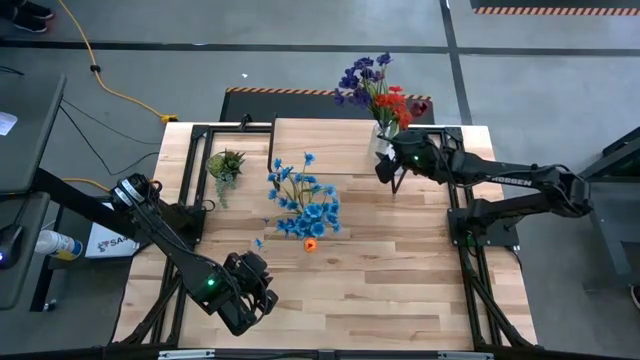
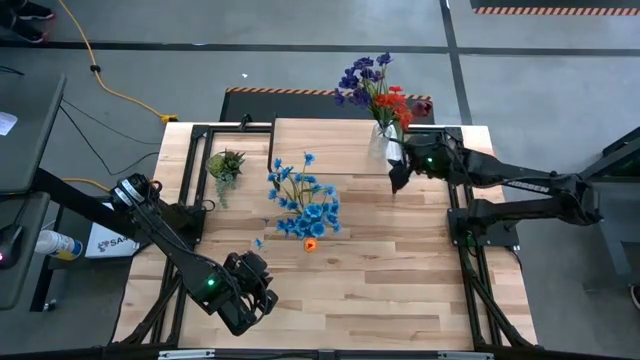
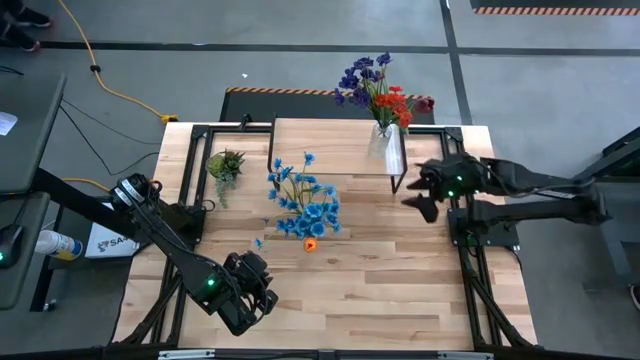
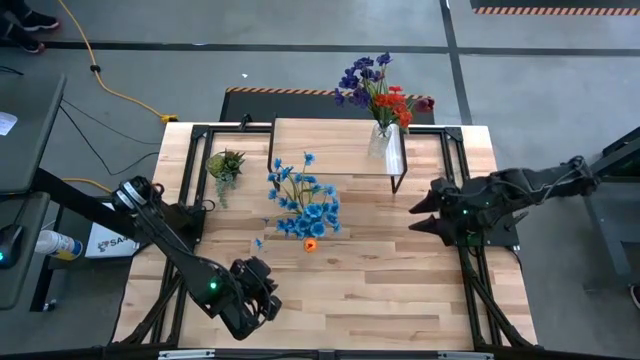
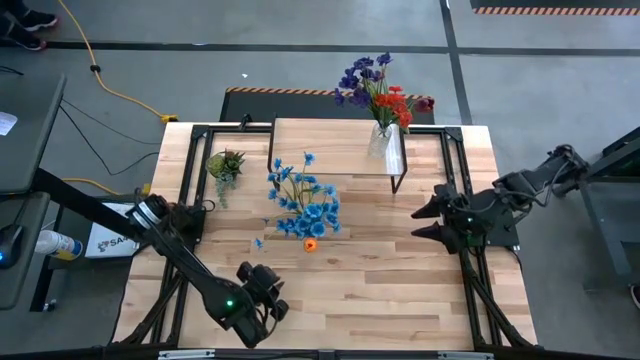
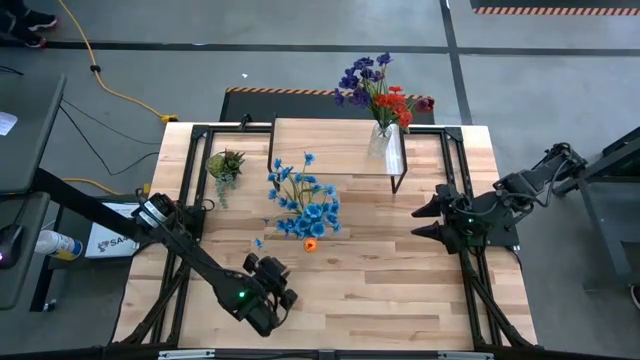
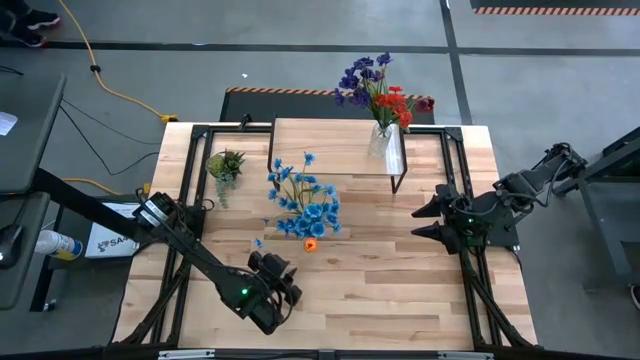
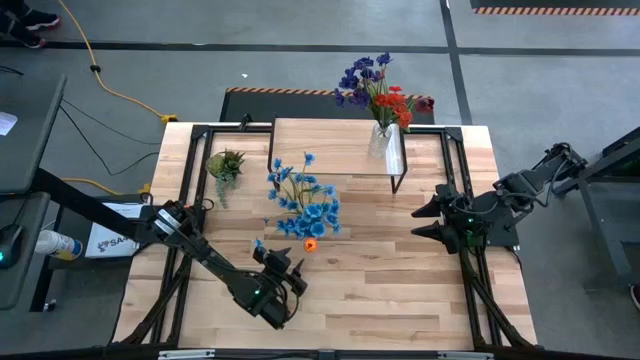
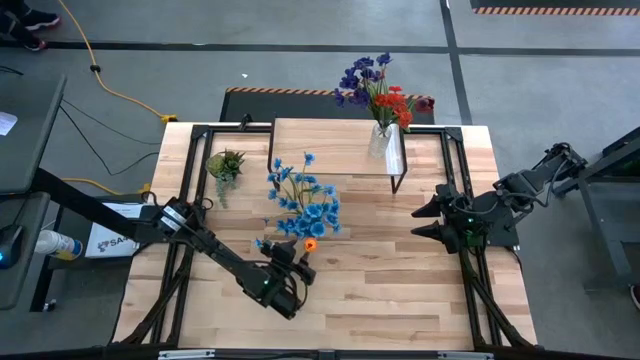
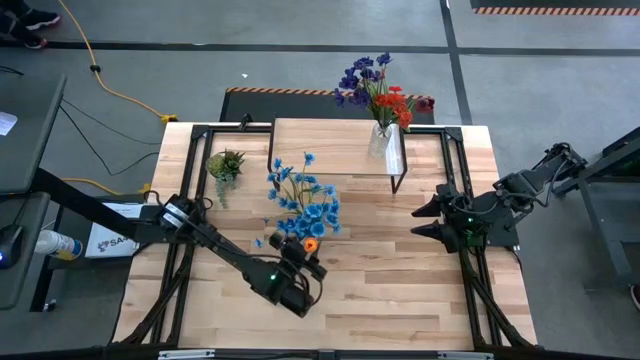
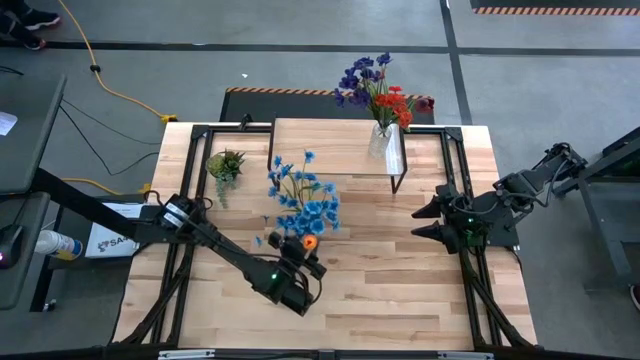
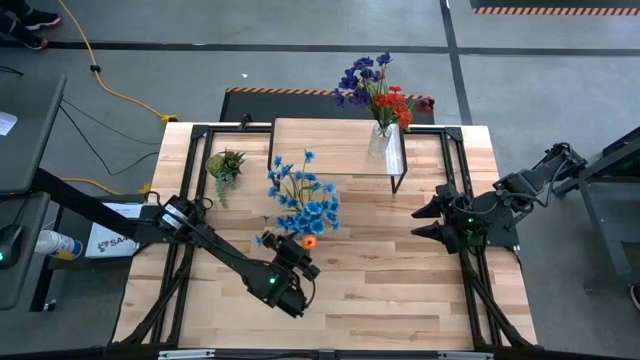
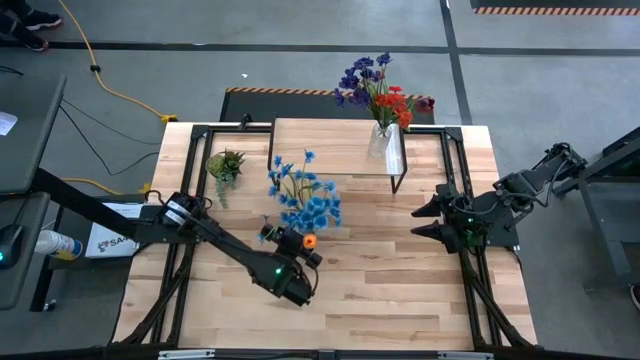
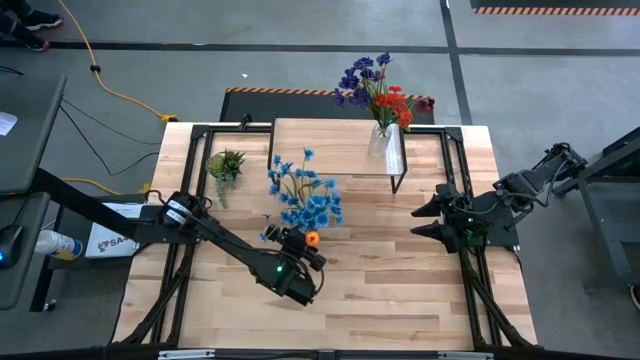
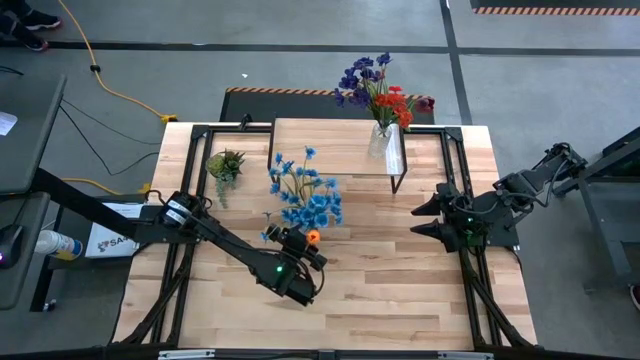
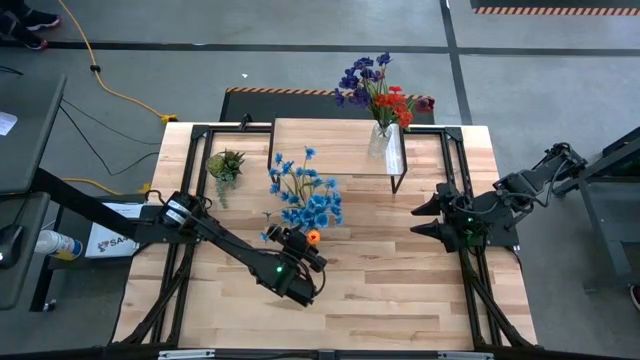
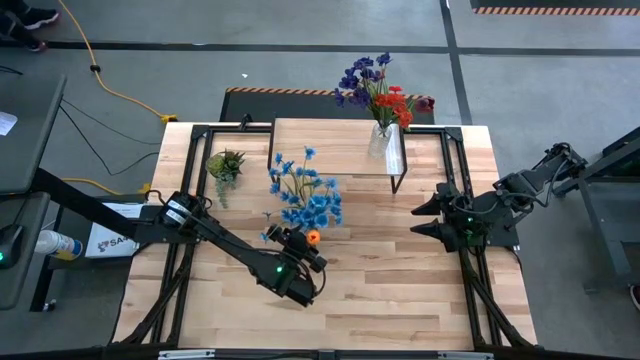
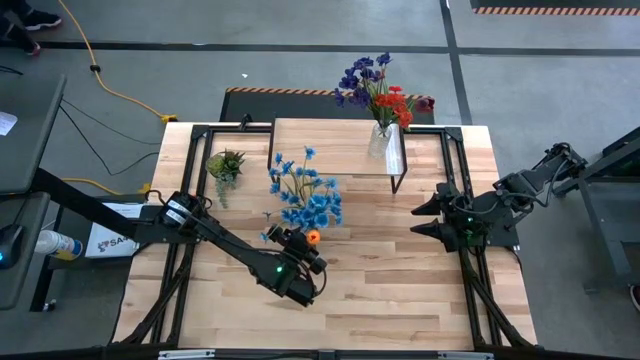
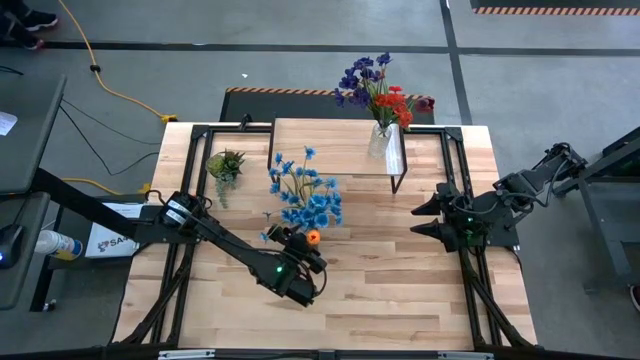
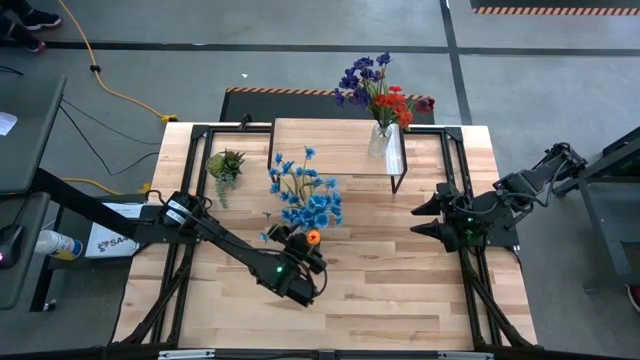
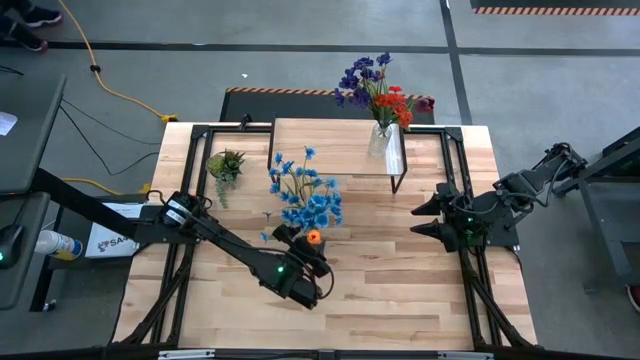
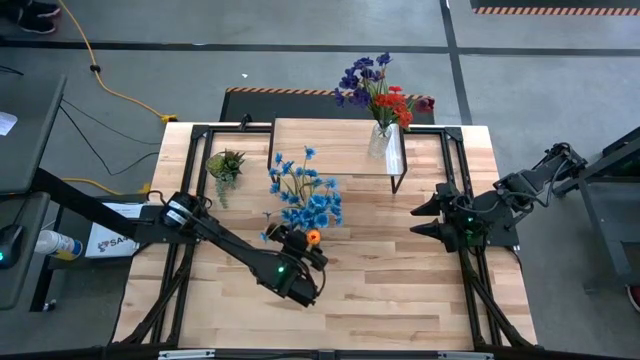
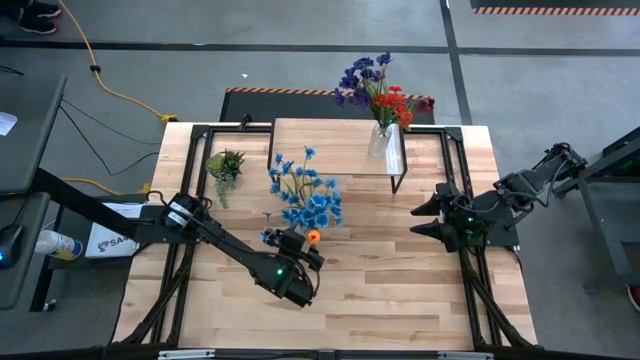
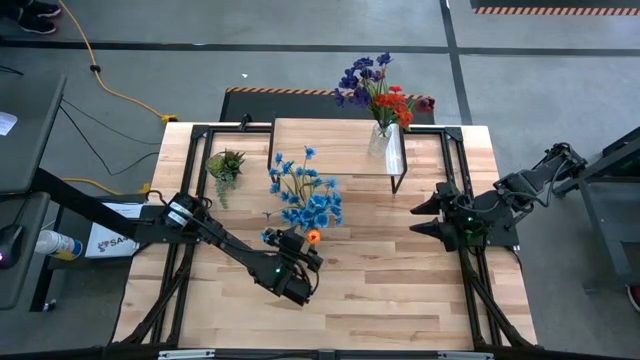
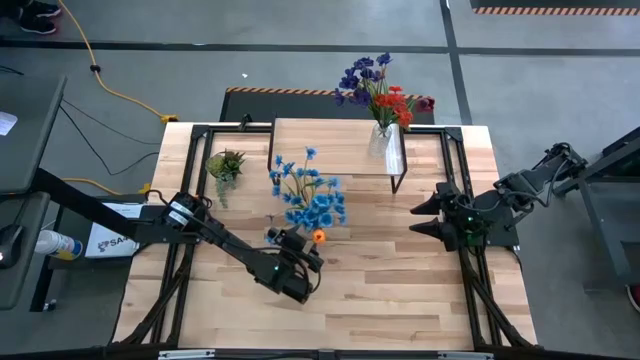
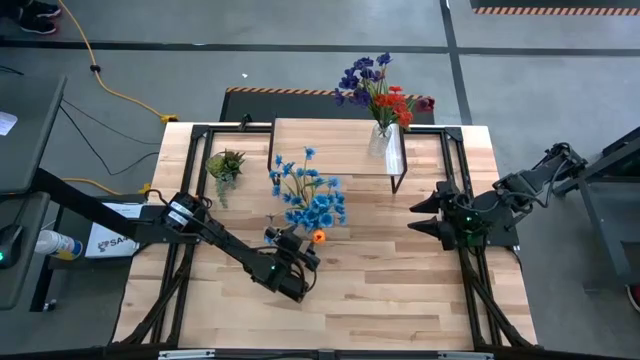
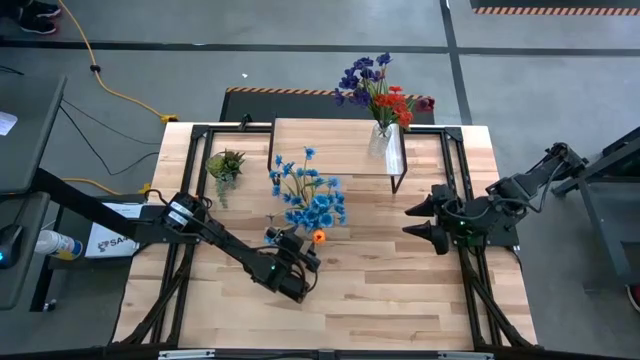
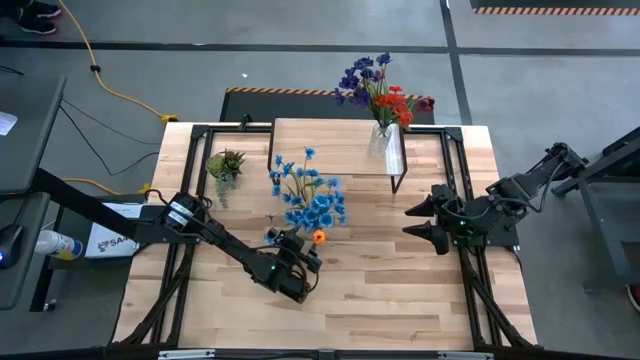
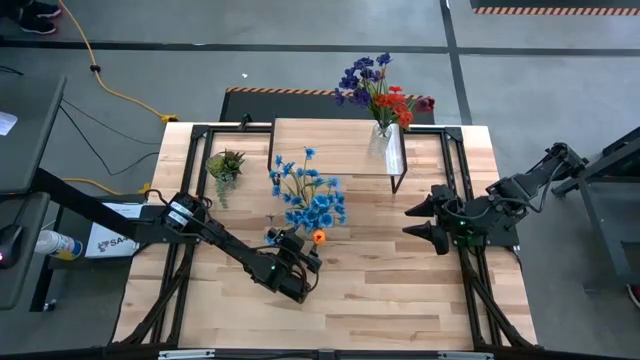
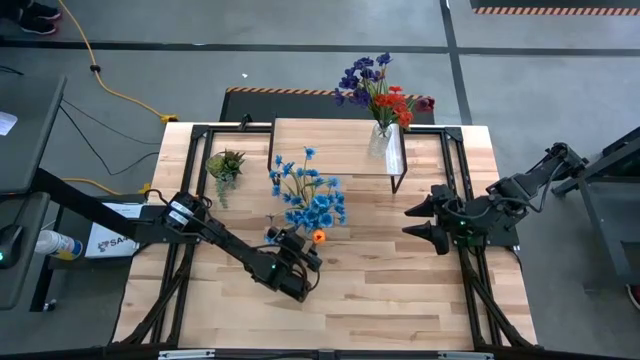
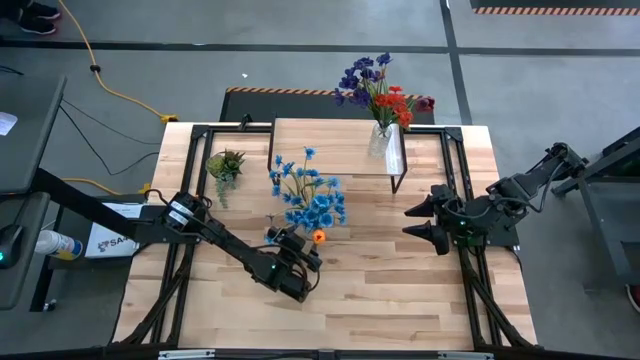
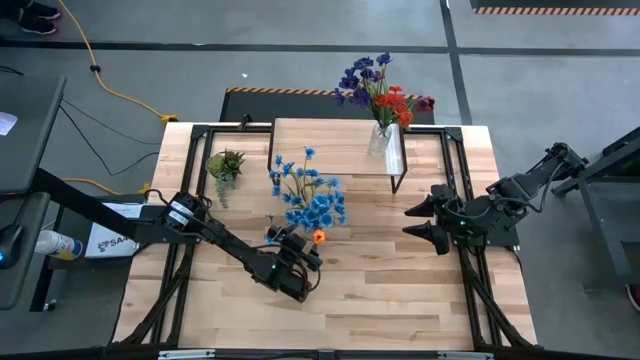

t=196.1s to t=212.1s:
Task: Pick and place flowers into a vace then onto a shelf
Put the transparent flower vase on the shelf

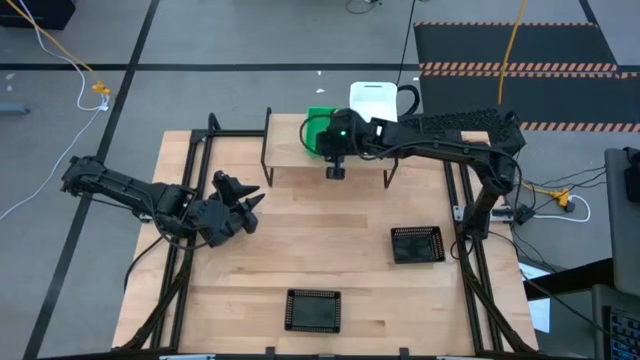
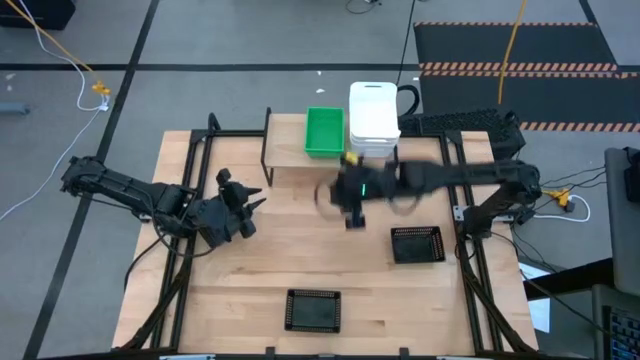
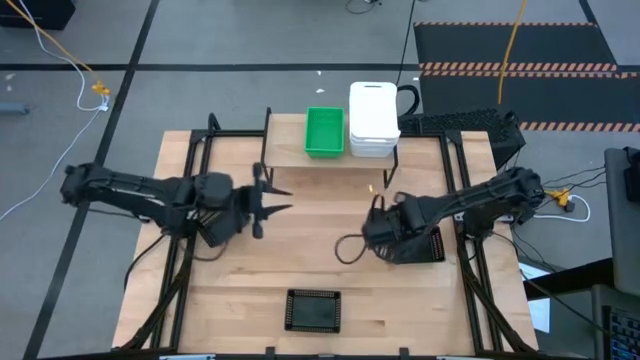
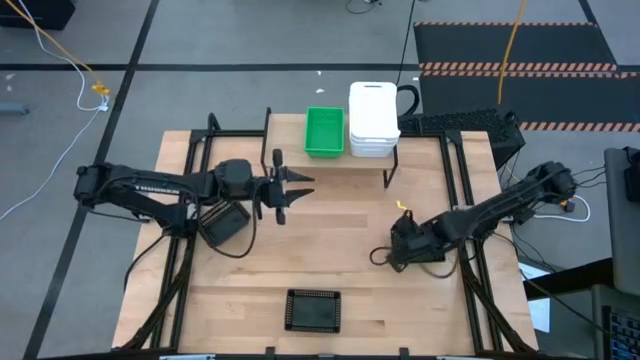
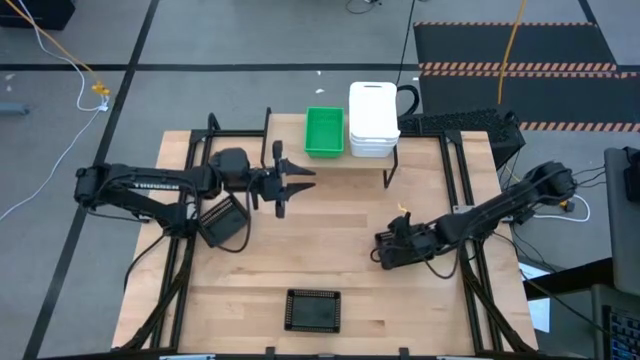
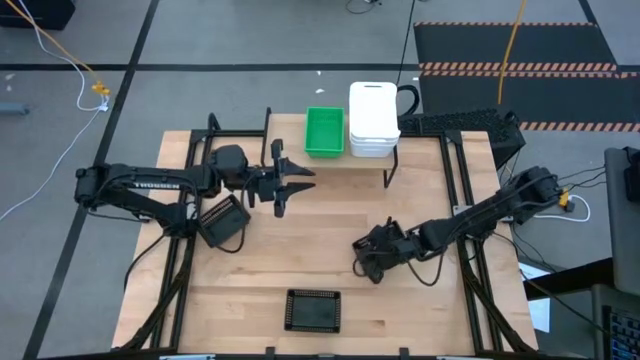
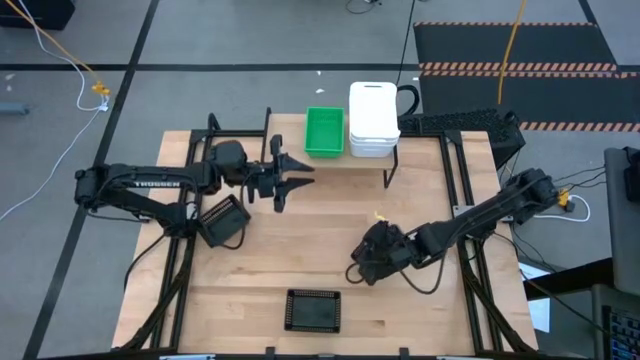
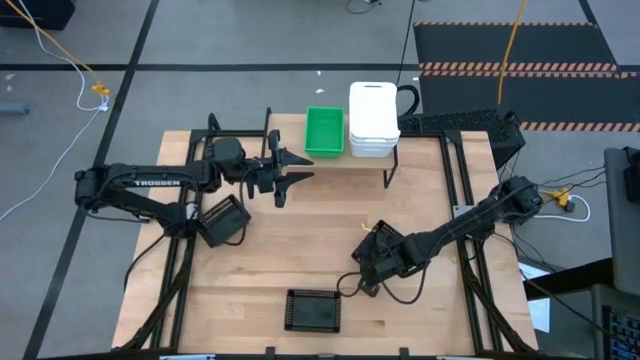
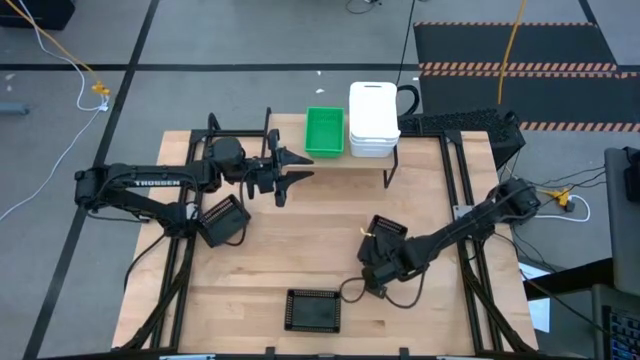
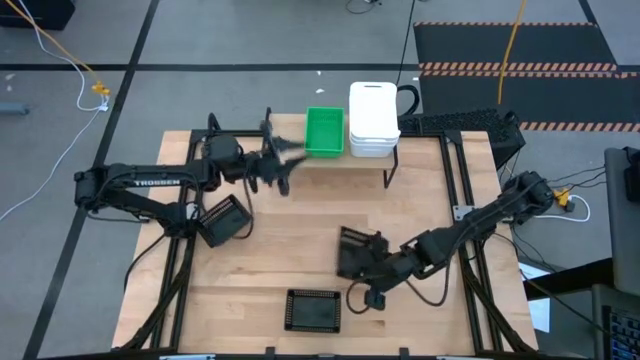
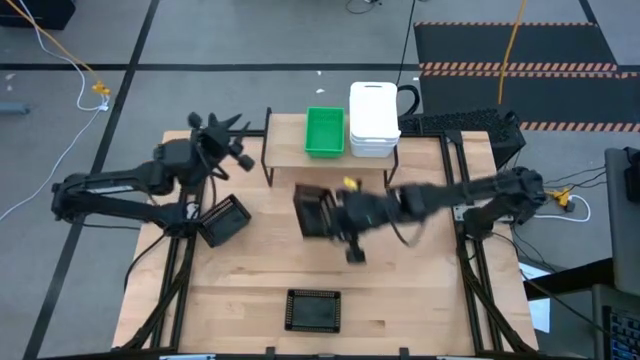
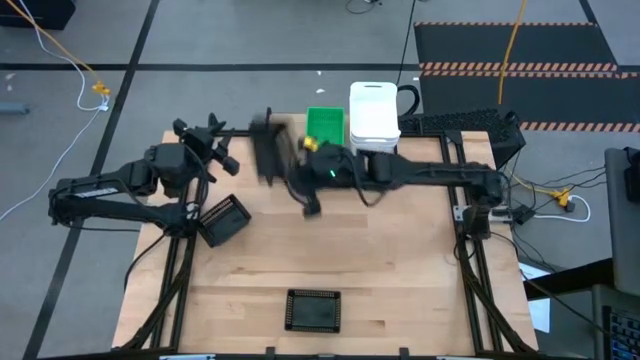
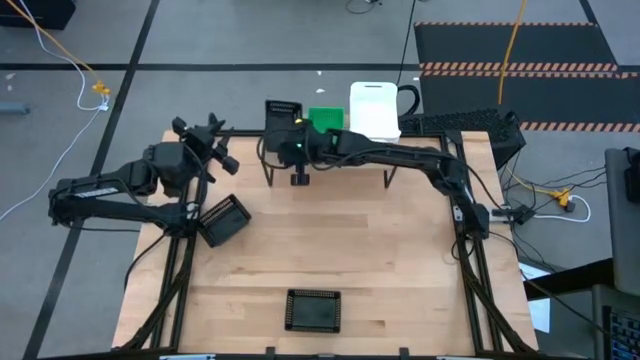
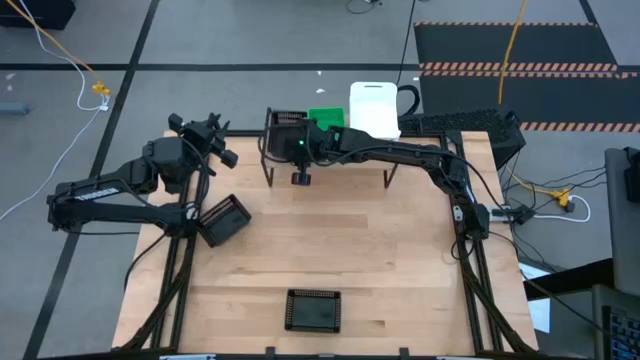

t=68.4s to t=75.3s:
Task: Stack baskets on shelf by color
Put the middle right black bin on the shelf
